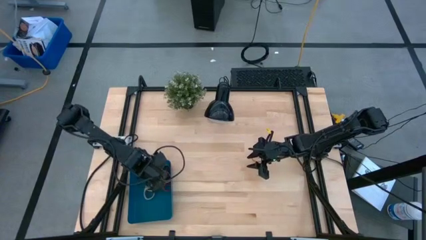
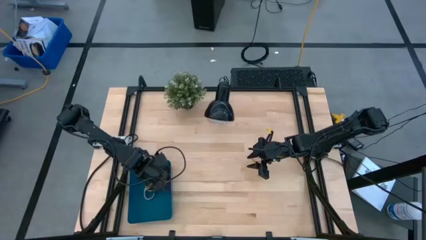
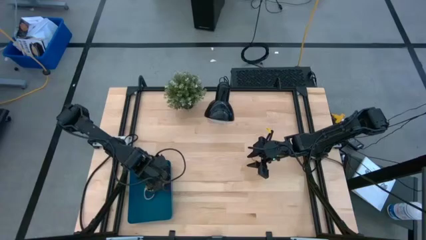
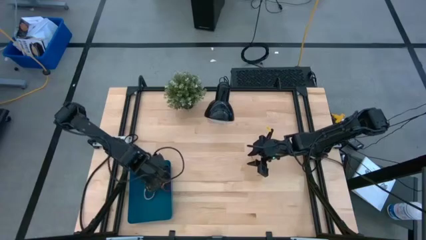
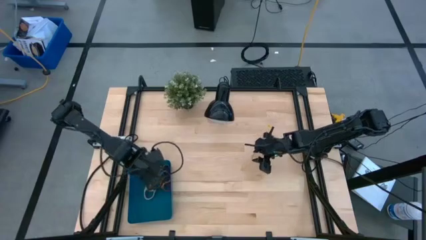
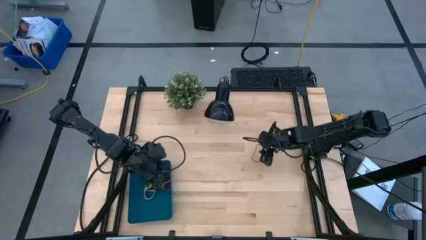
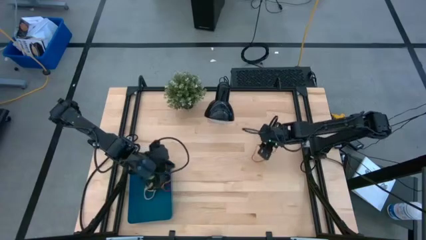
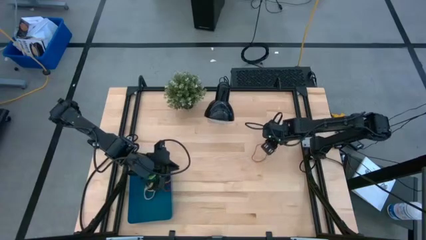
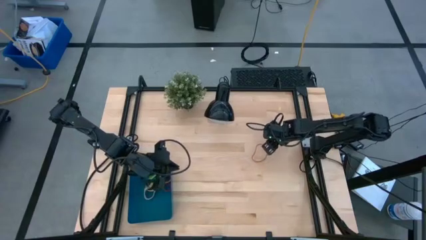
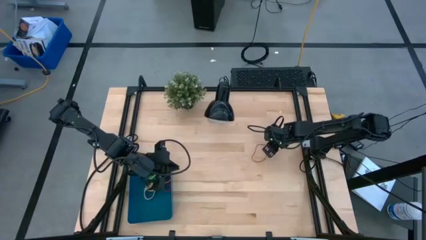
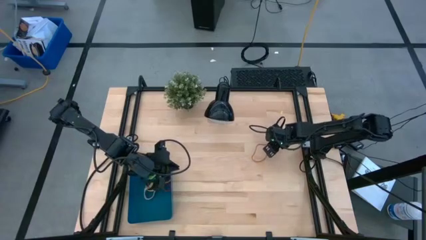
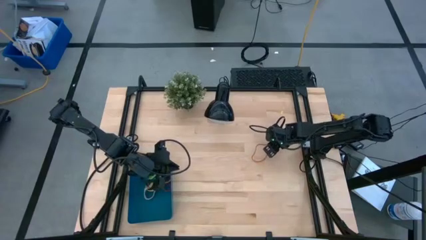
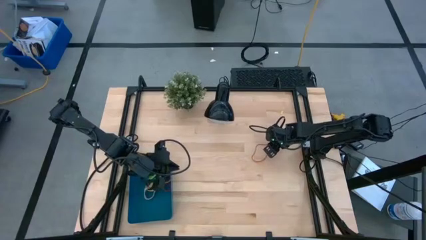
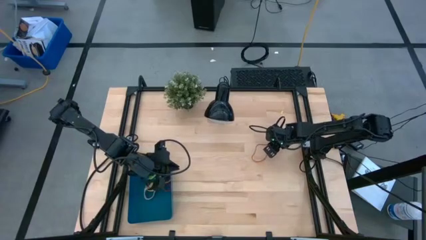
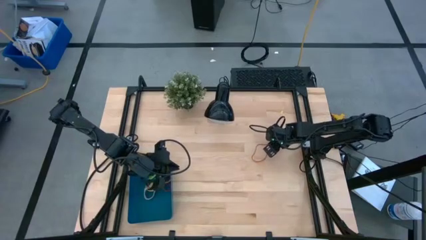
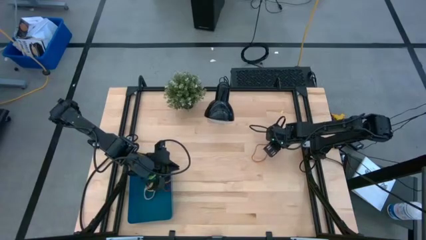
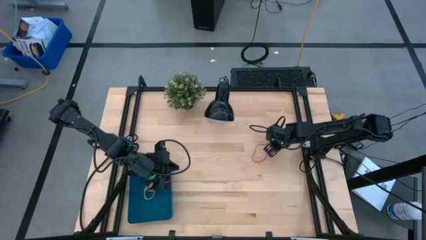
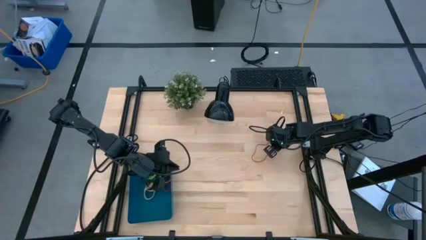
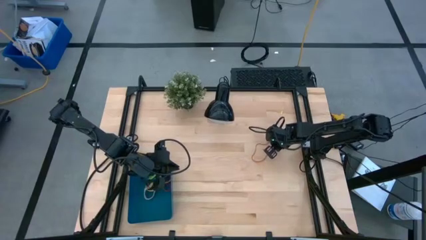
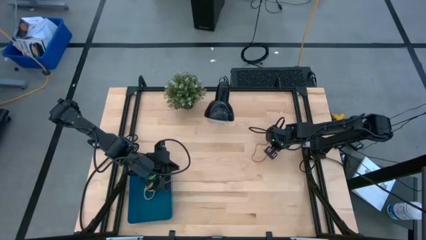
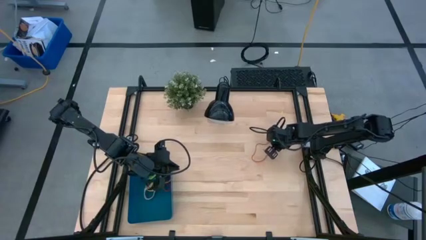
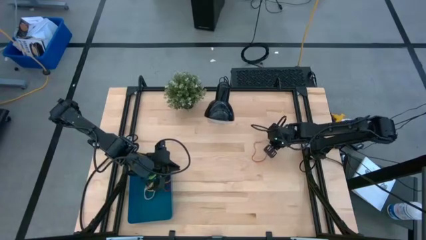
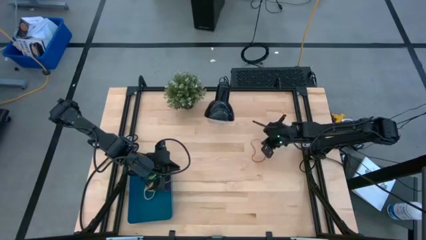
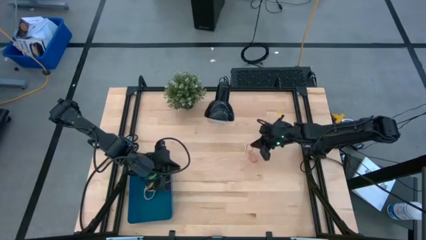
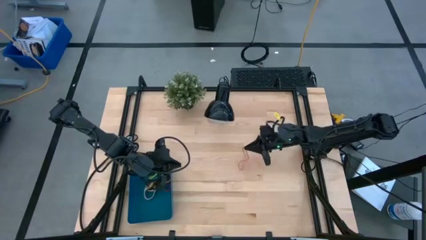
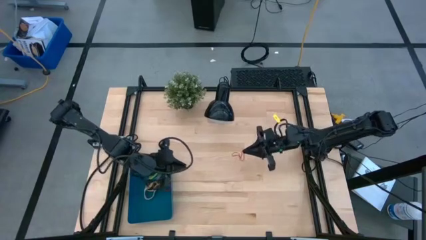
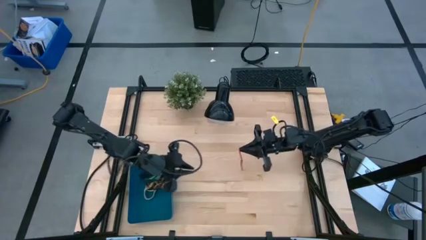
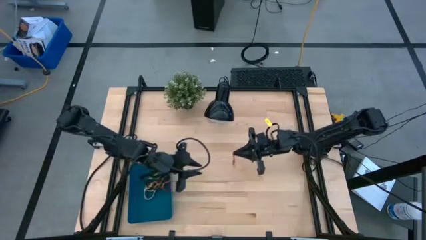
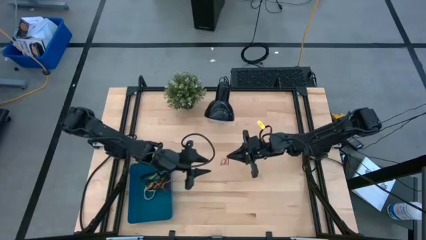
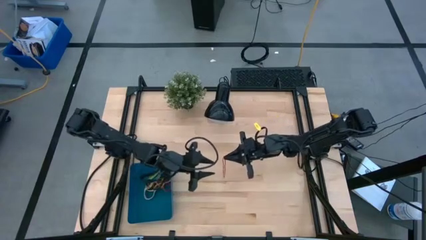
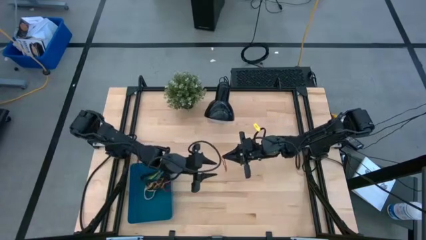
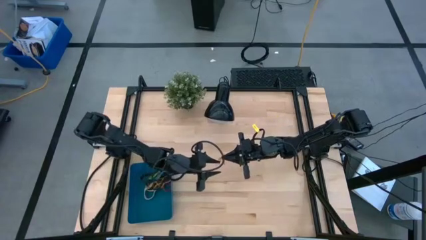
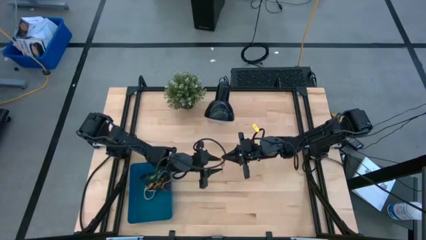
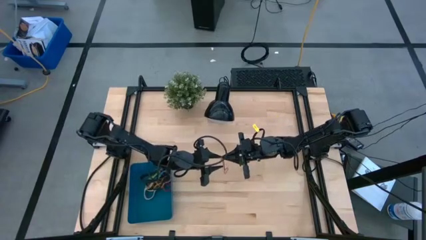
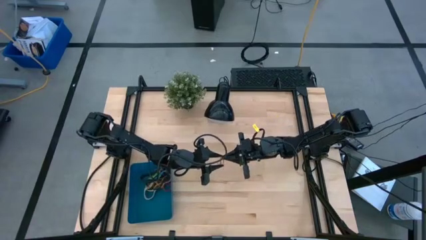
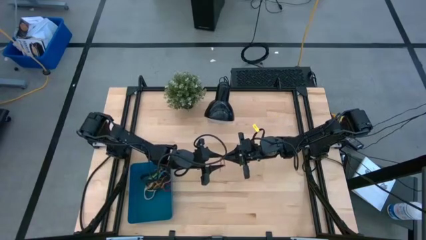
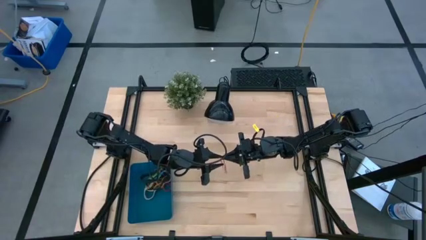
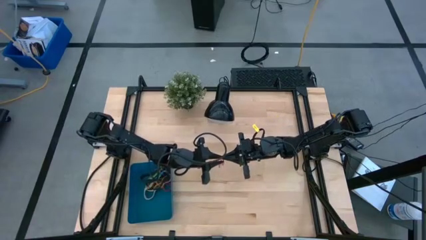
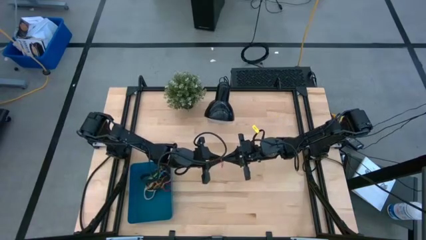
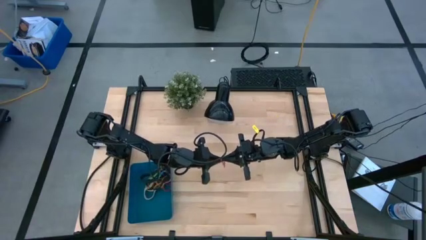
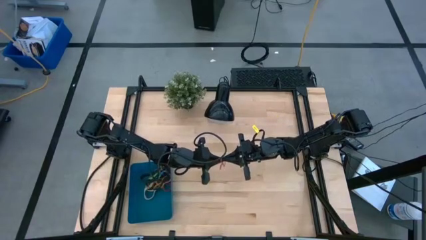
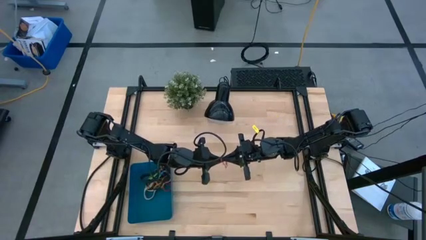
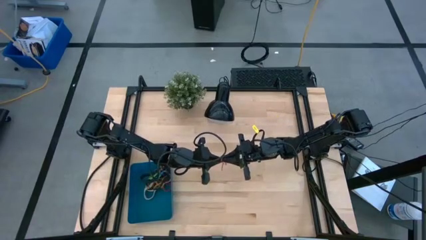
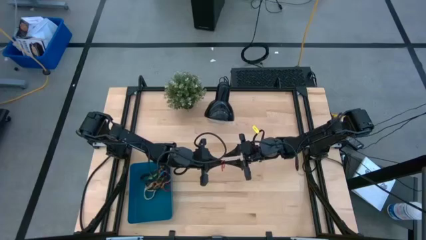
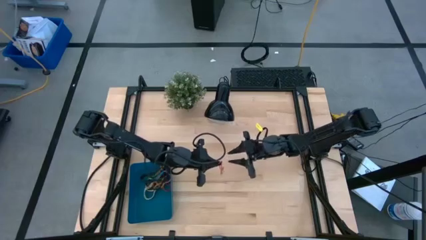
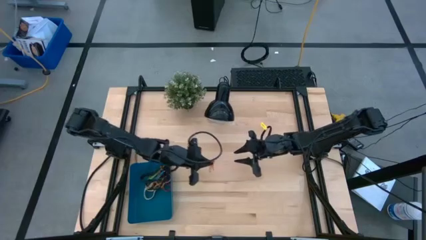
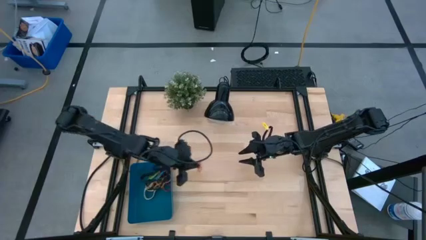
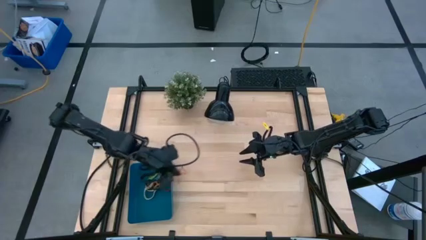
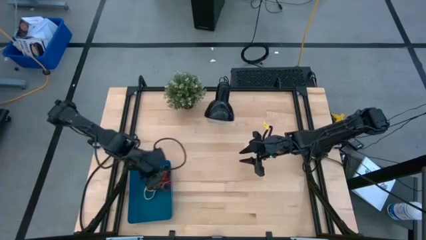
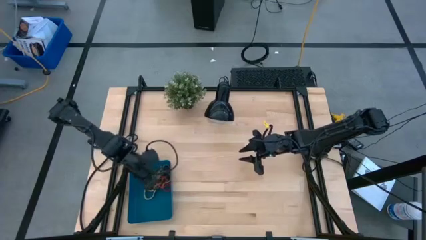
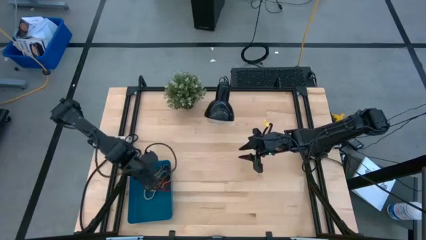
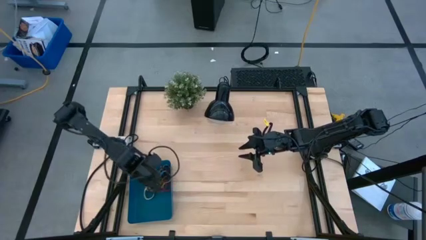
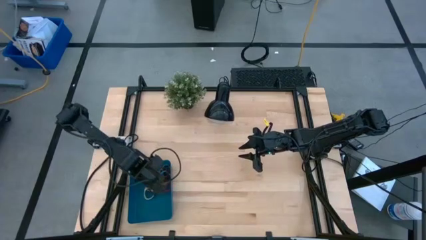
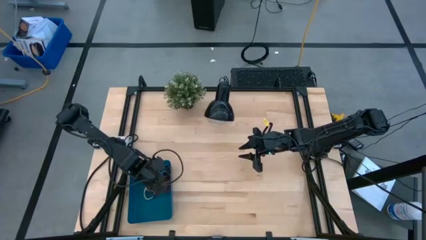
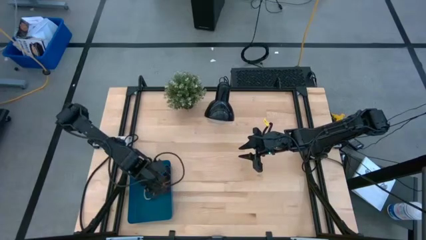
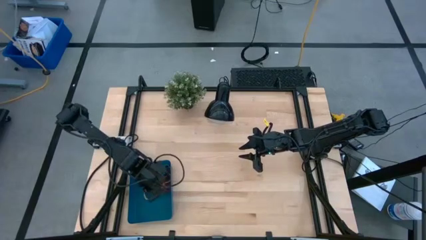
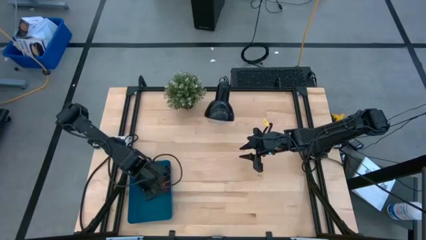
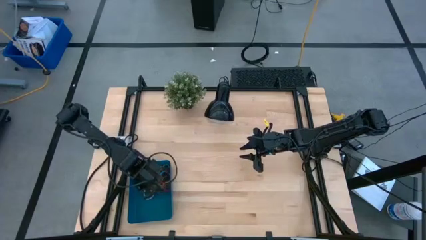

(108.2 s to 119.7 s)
Task: Pick and place rubber bands into bin
Put the red rubber band into the blue bin

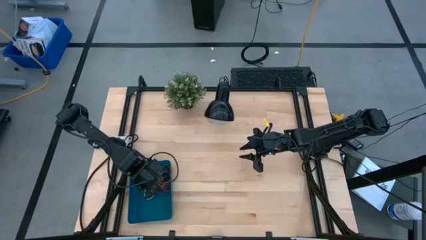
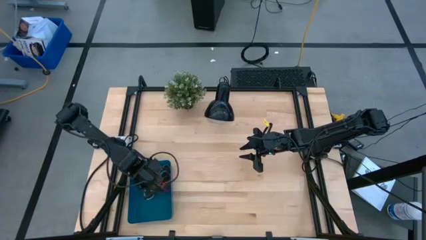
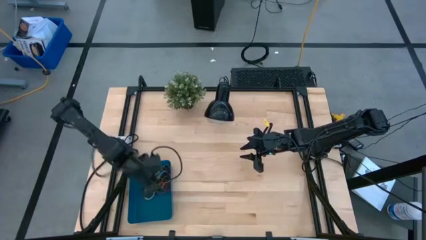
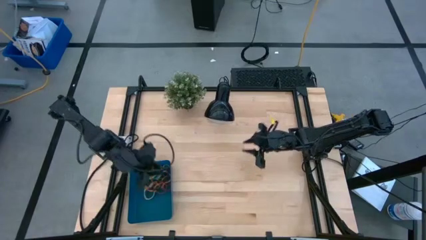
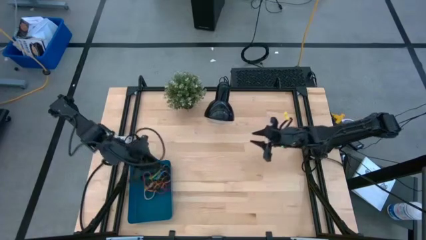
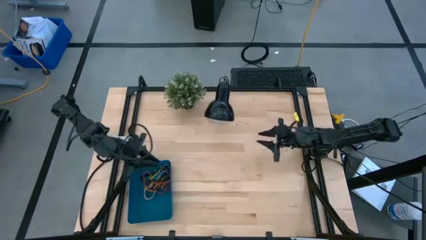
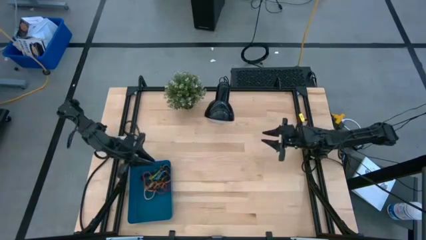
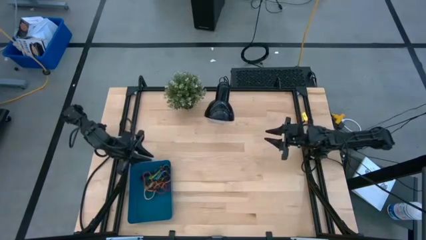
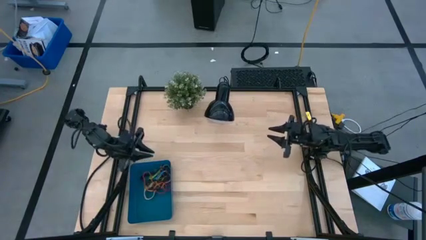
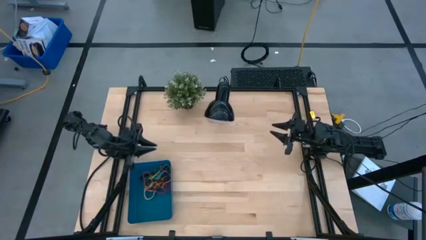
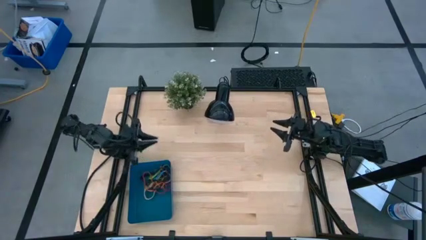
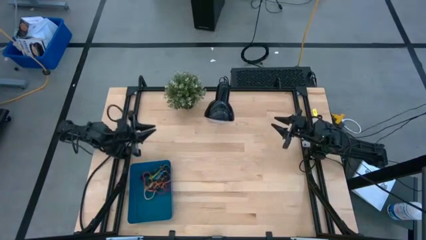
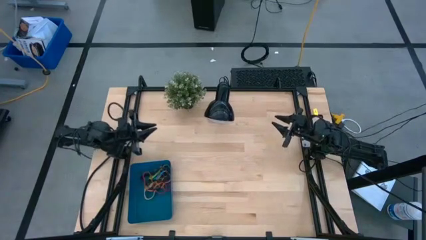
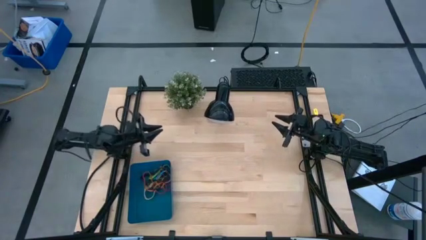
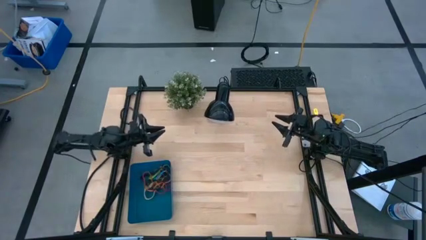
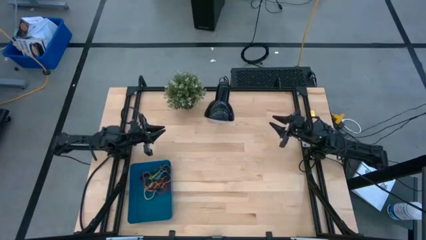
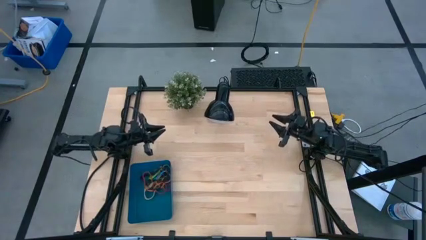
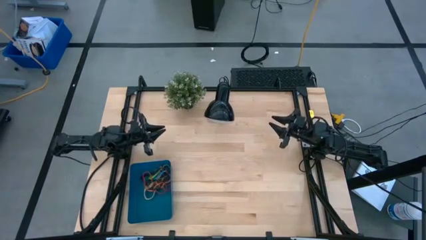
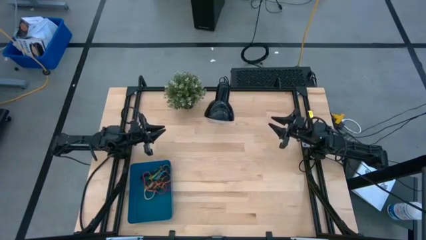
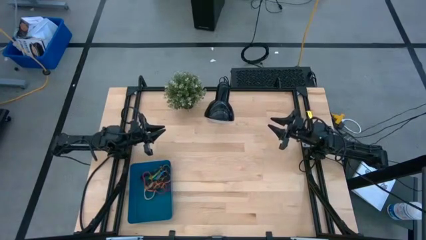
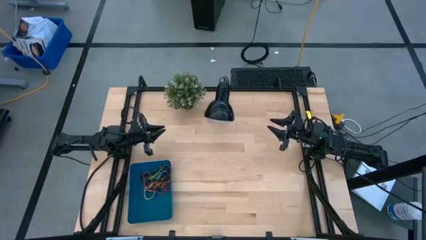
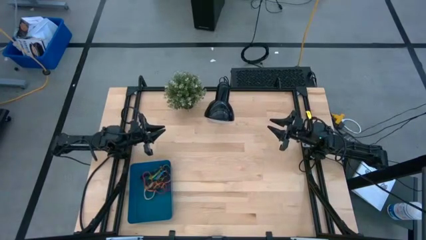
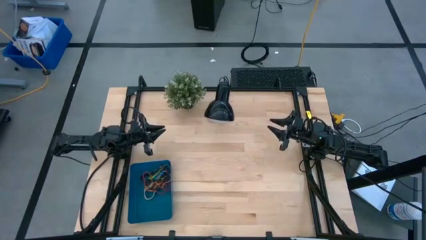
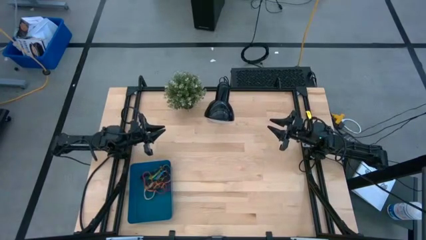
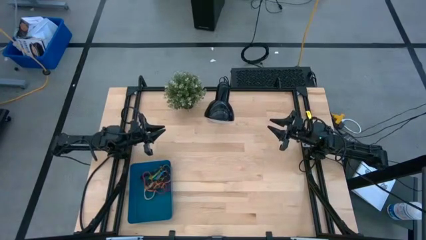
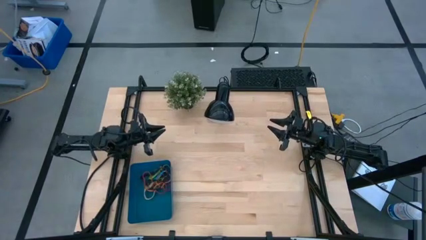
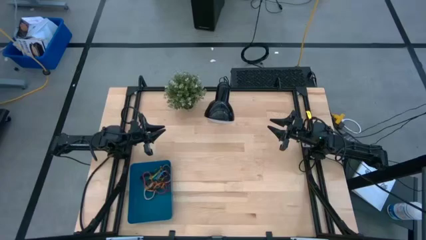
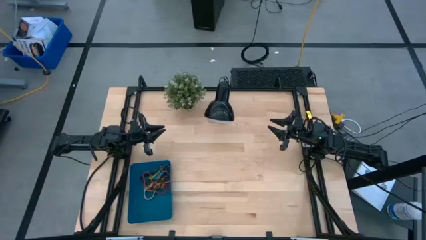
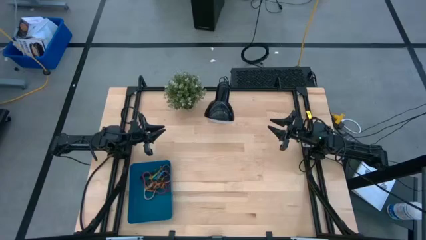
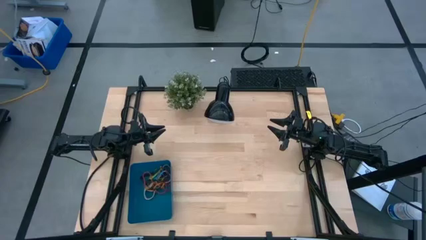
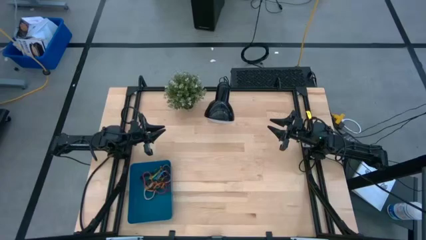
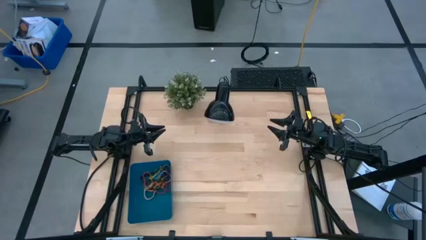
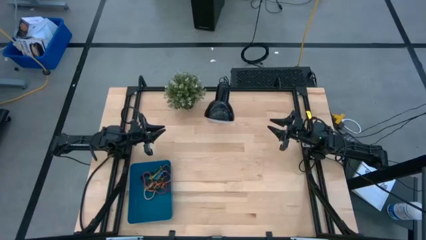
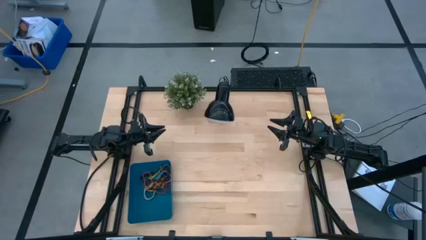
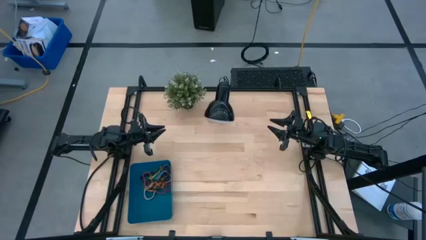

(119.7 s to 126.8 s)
Return to Home Position
